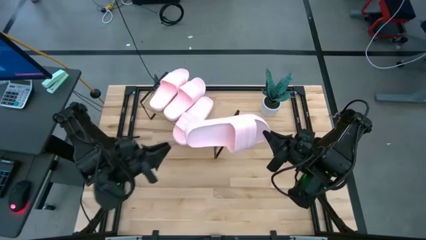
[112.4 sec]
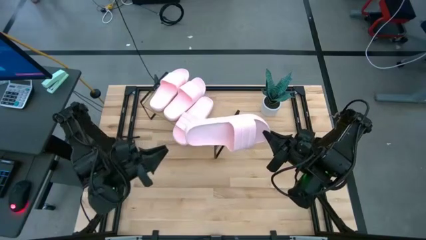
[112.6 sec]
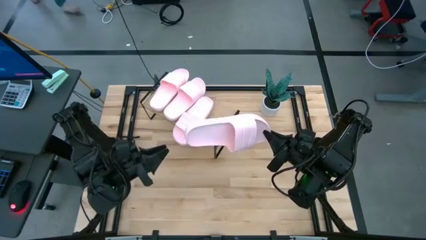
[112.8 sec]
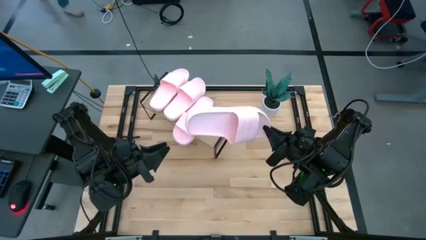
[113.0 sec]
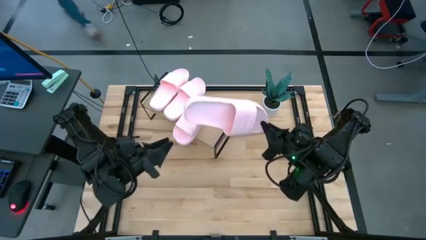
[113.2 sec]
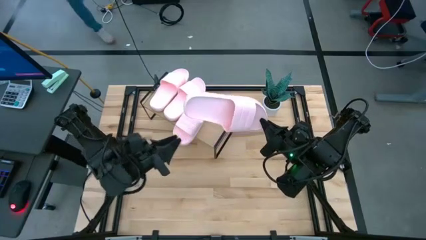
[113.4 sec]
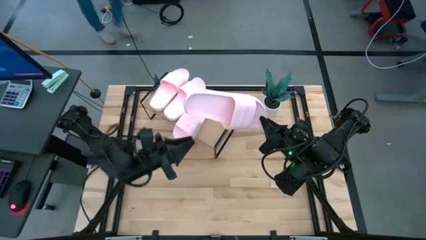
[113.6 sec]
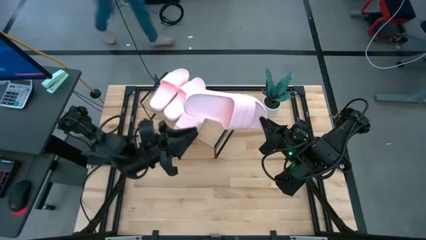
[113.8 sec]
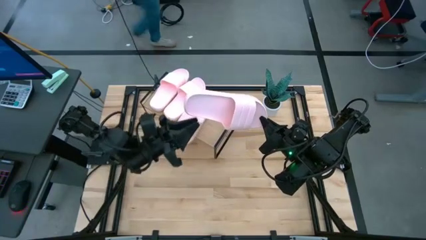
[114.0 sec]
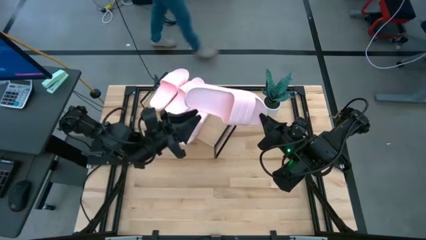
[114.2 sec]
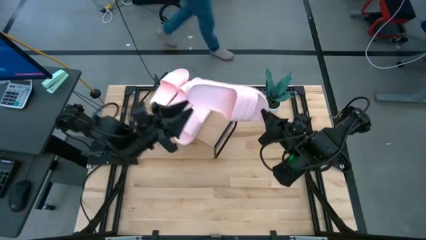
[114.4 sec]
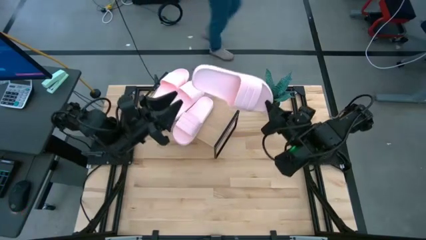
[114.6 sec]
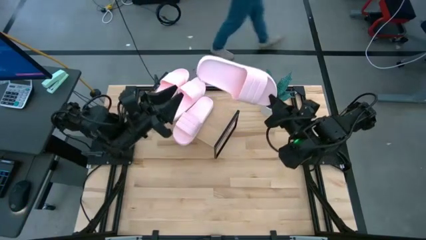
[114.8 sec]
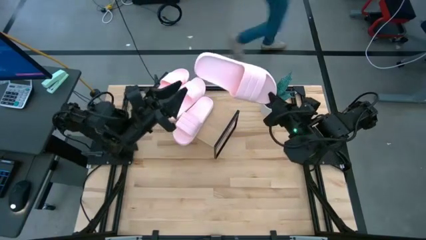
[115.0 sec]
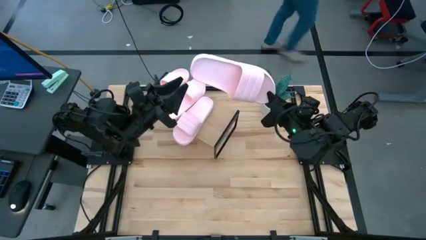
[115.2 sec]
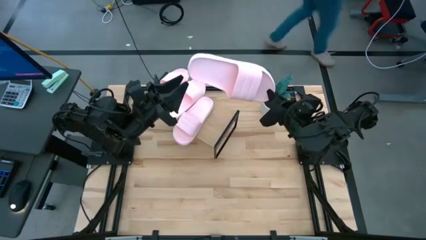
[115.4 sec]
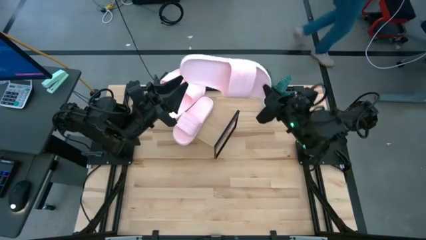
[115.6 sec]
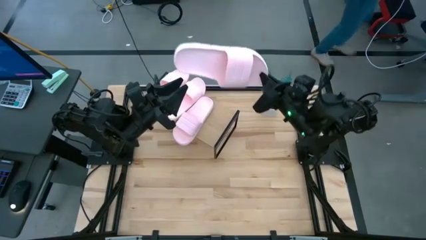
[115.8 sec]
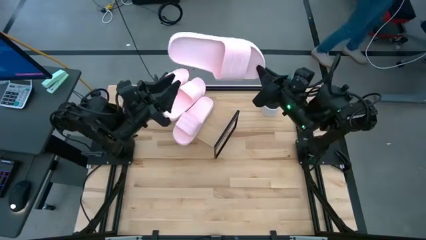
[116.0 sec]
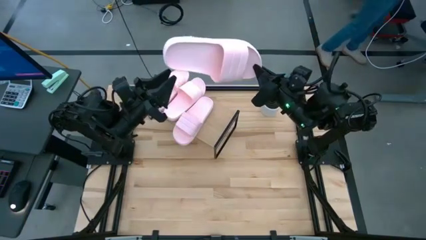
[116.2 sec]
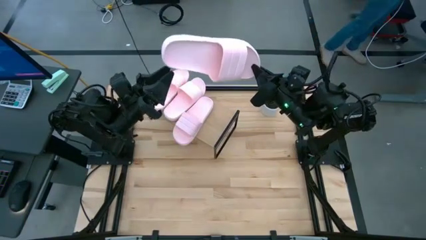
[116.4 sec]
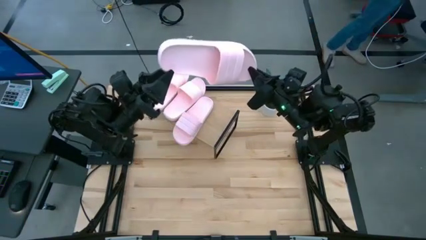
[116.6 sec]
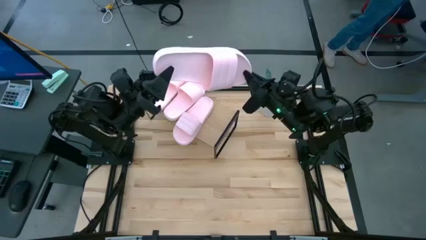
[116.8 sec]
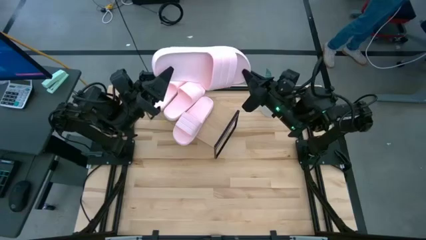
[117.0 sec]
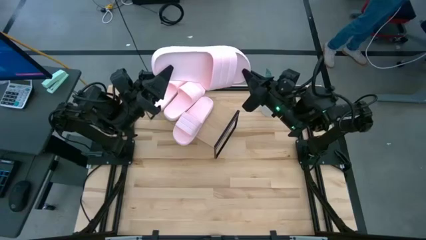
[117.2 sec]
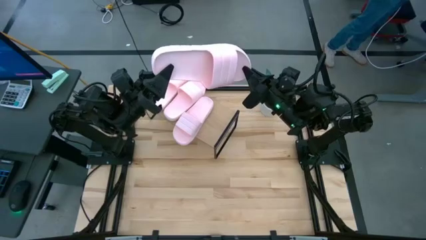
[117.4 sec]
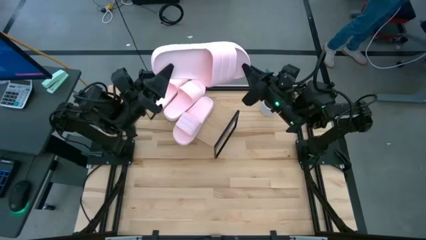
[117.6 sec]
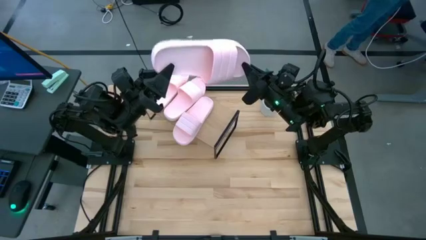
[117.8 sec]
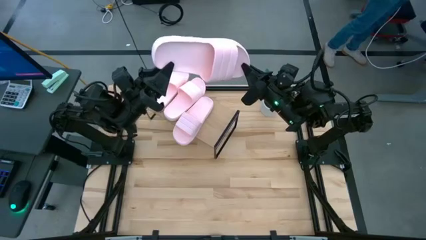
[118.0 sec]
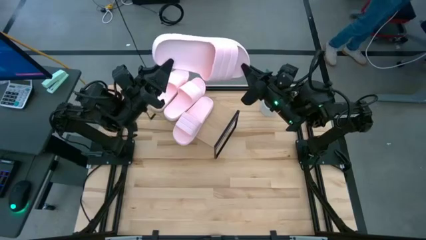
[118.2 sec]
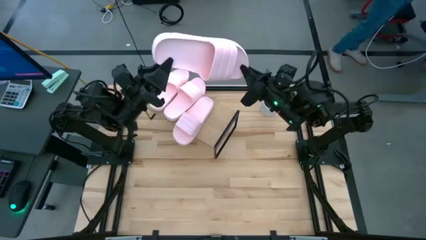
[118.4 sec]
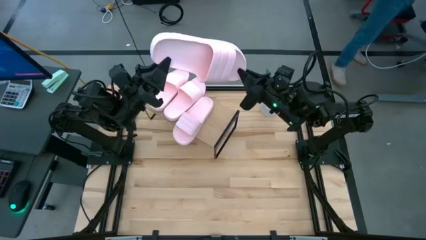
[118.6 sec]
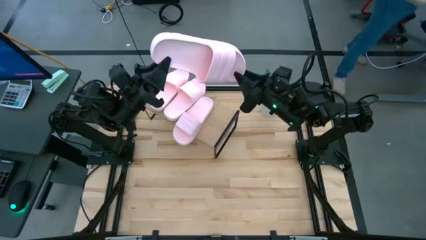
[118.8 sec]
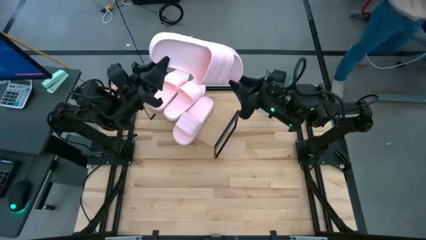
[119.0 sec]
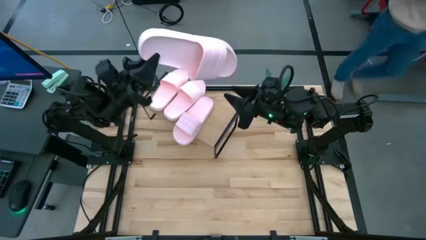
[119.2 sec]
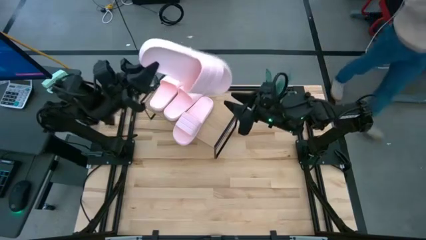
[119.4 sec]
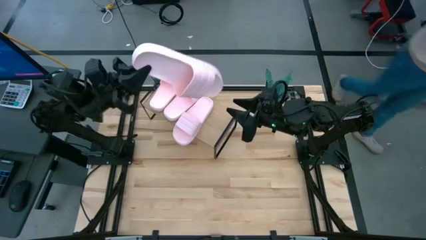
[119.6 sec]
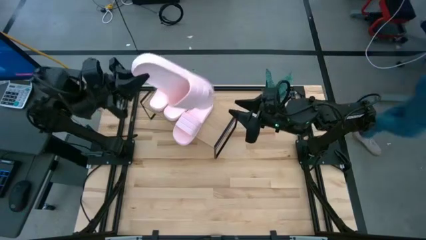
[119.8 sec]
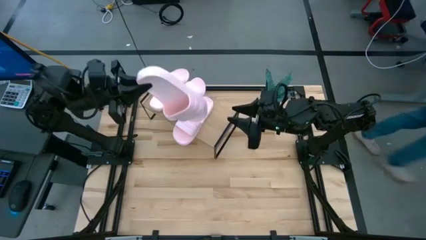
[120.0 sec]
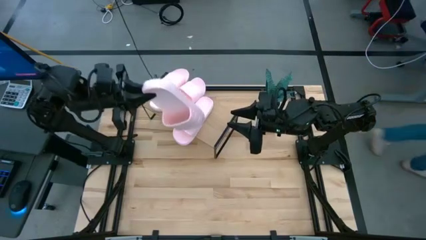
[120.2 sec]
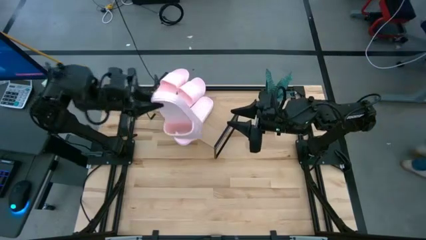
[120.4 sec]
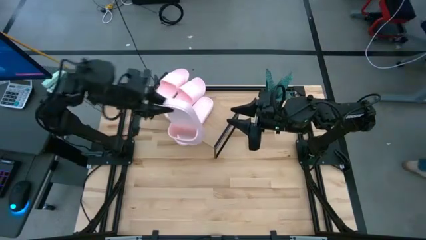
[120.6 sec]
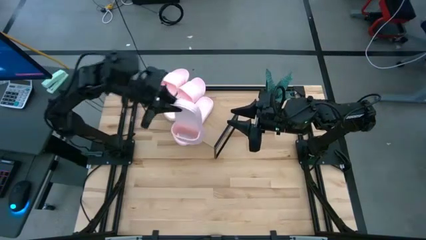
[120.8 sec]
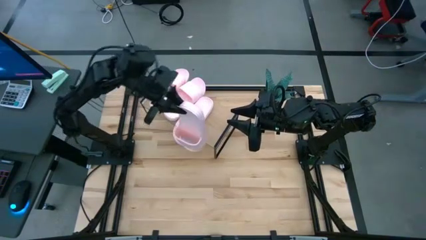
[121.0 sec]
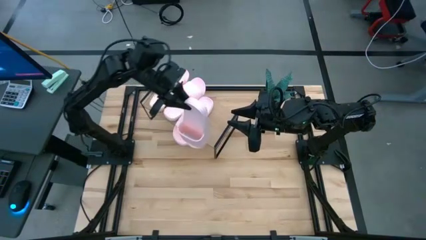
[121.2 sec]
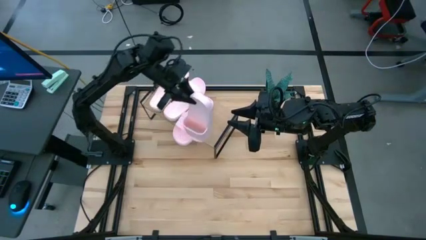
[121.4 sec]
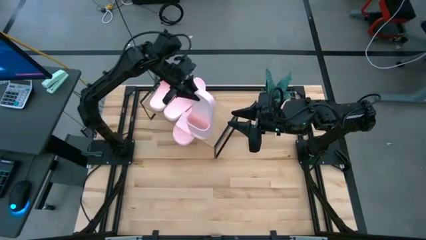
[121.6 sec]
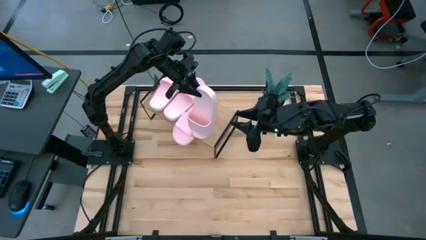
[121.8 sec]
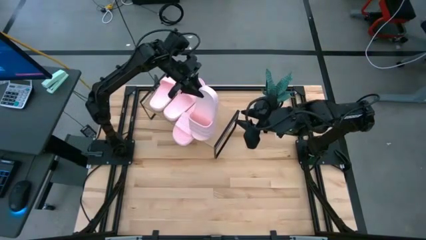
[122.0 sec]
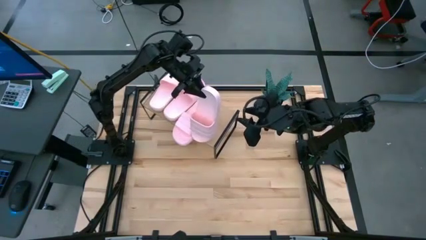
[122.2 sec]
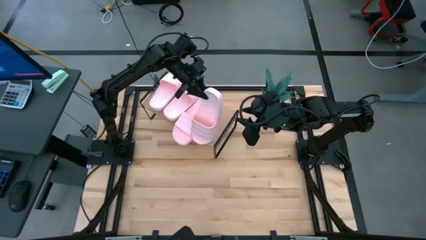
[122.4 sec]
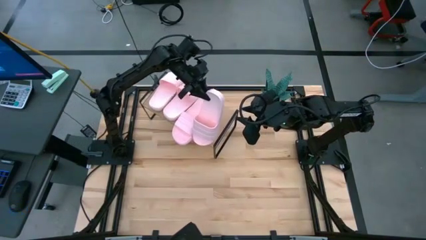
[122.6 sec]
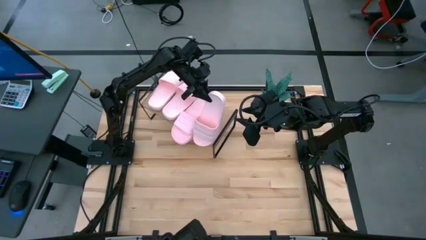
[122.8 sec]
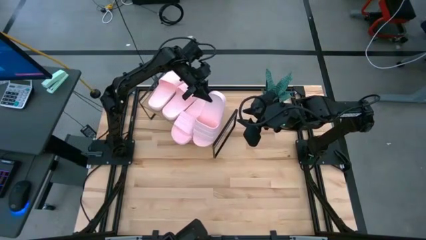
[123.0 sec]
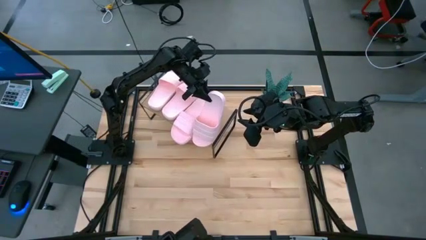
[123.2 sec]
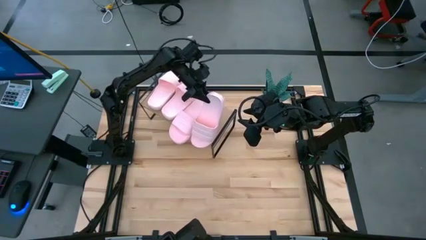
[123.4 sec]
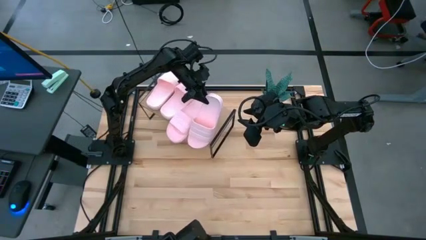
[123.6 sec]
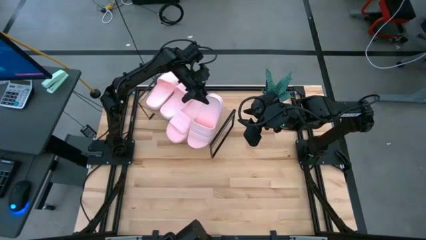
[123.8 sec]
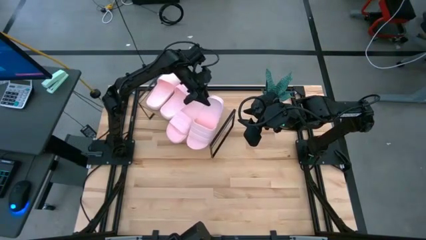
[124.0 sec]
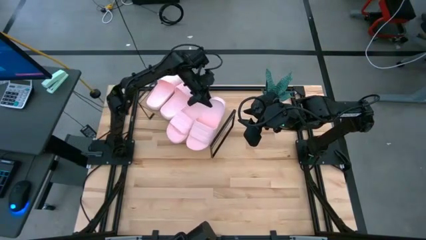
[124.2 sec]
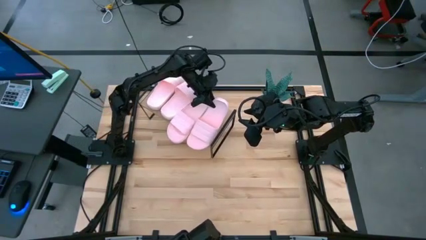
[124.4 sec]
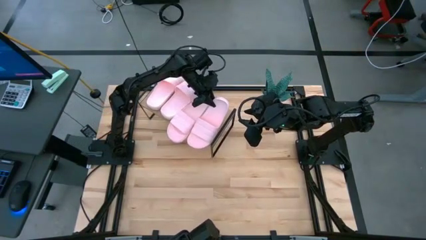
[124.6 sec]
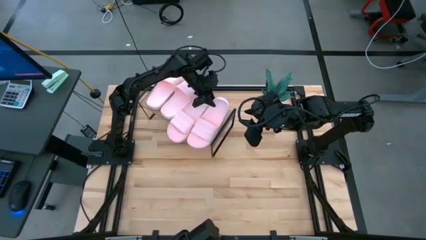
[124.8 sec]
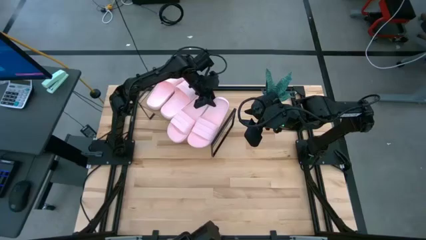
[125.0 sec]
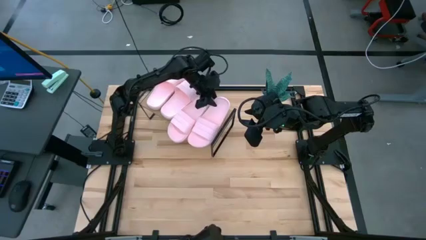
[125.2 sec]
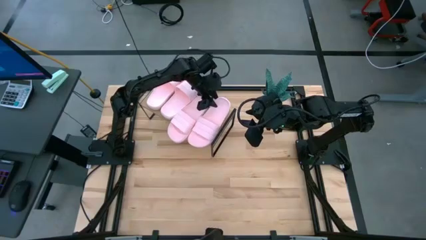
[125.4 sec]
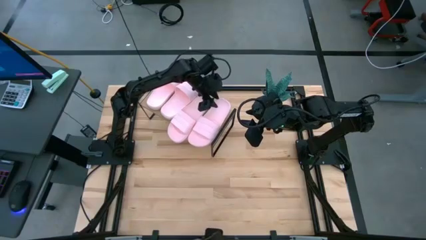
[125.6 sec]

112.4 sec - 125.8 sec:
Task: Pick and place slides into the shelf
Put the pink slipper on the shelf
